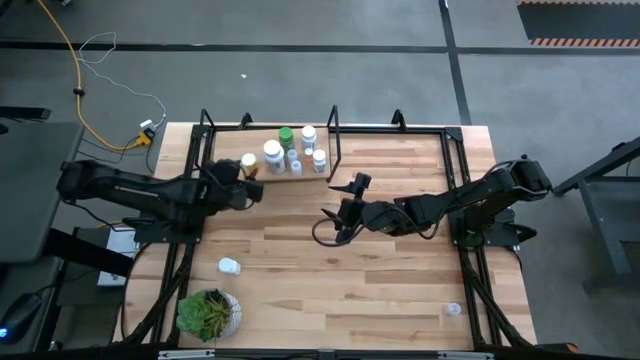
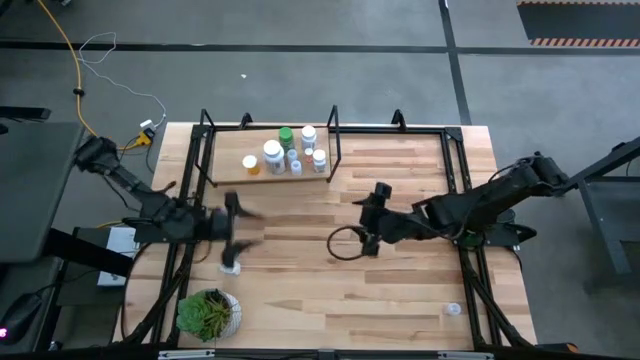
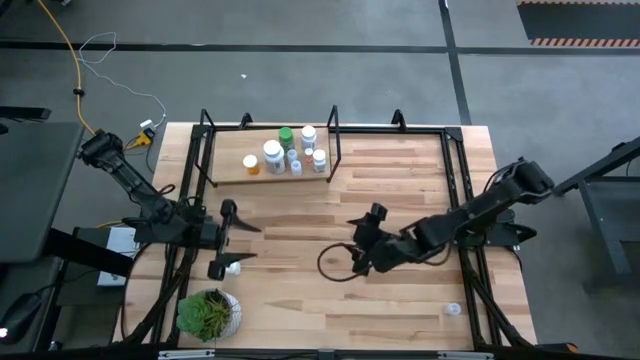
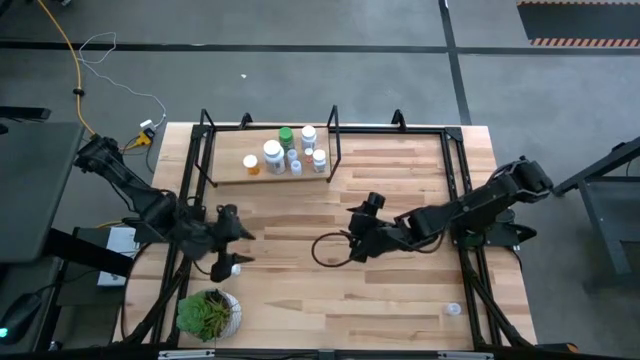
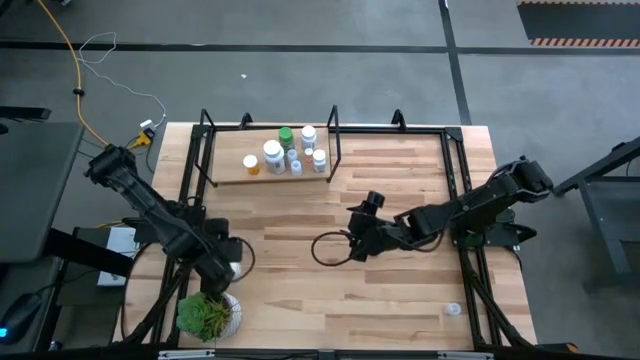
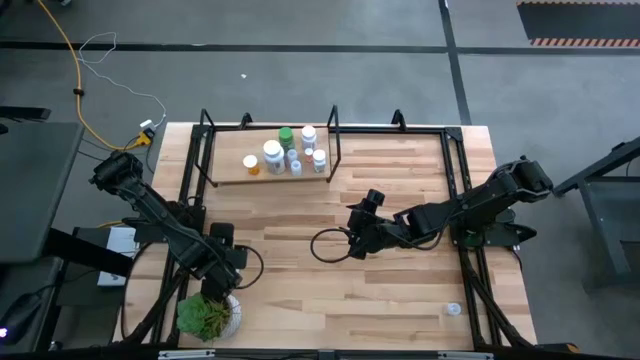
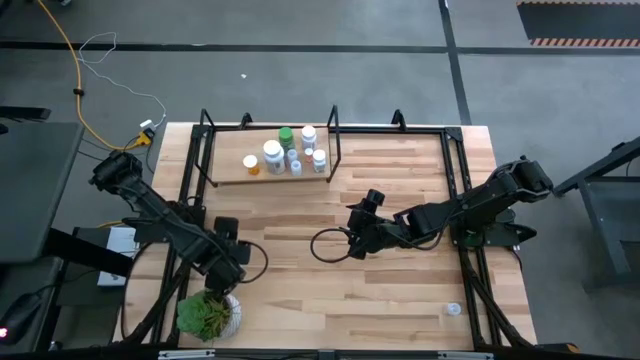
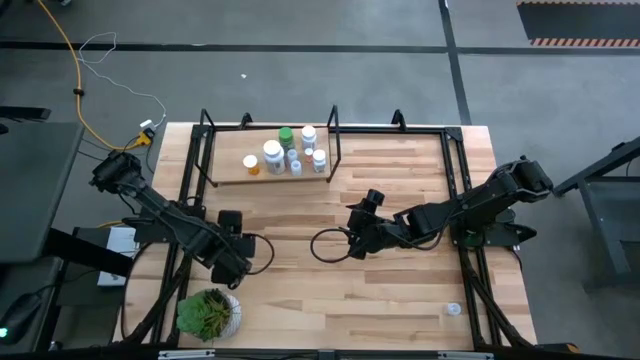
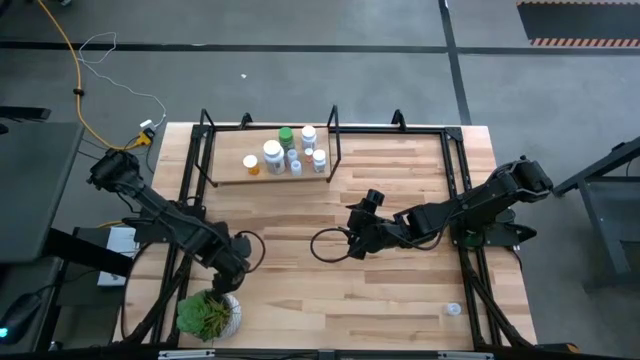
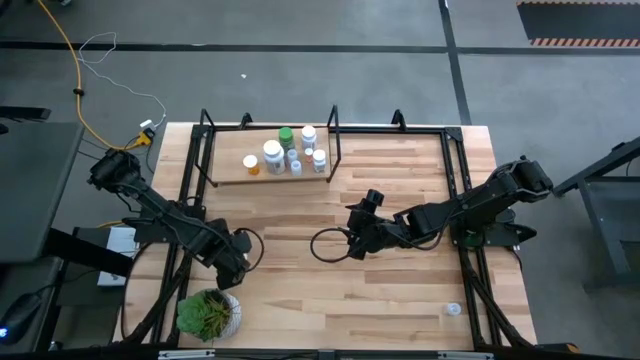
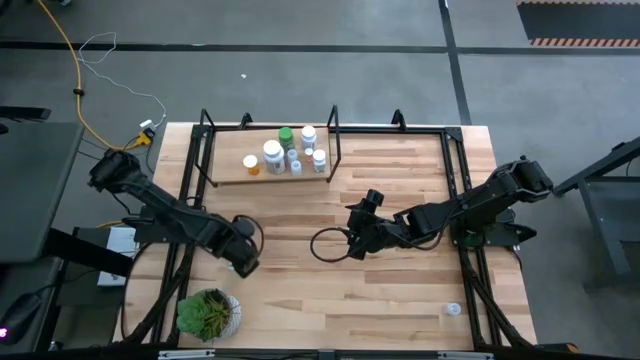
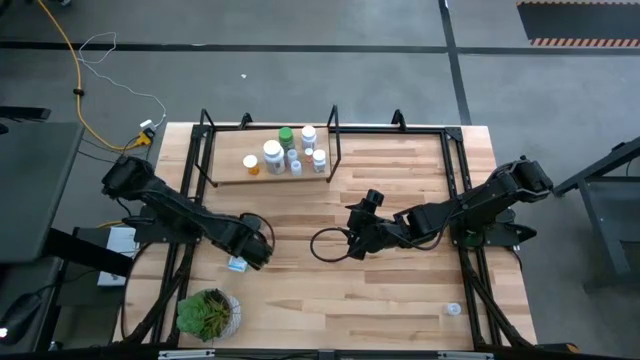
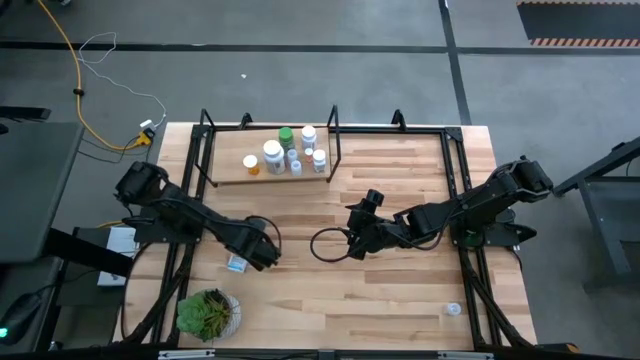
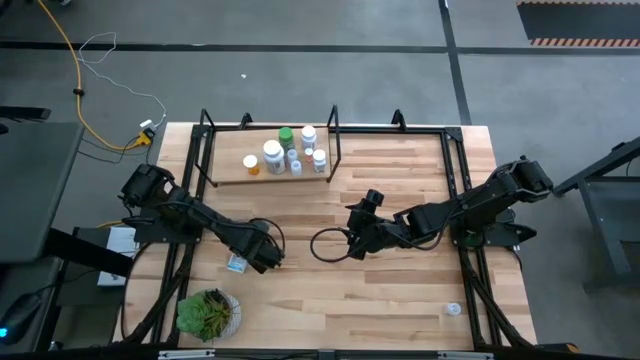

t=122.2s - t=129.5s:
Task: Pick and place medicine bottles onto shelf by color
Put the medium white pill bottle on the shelf

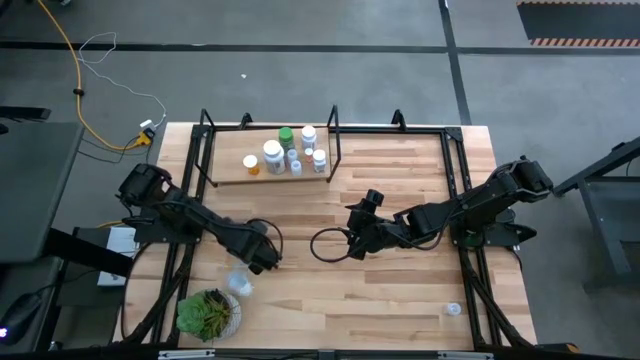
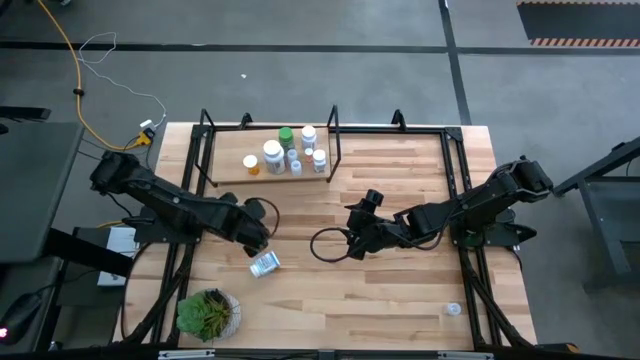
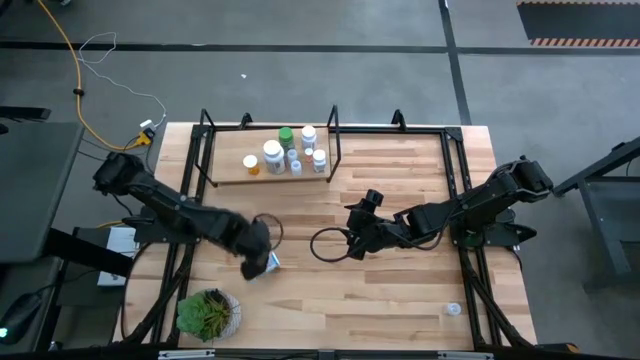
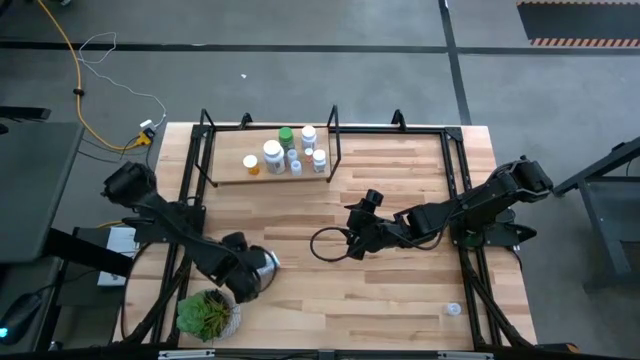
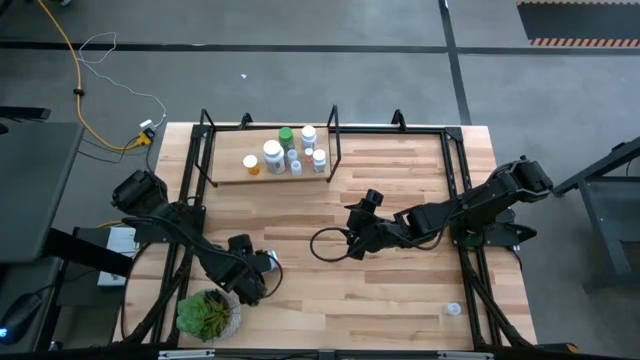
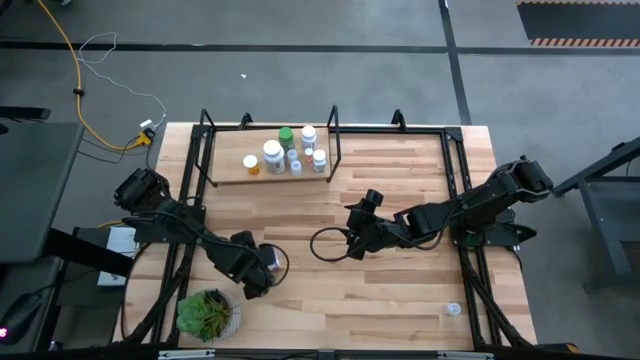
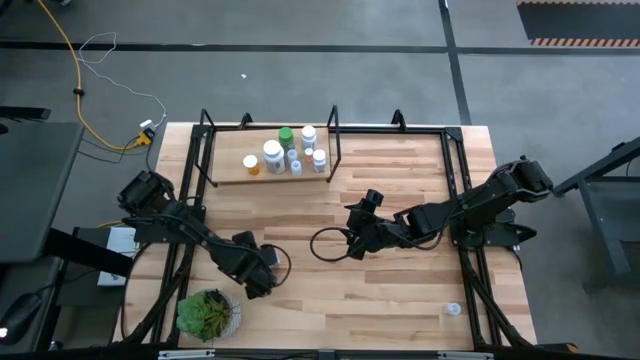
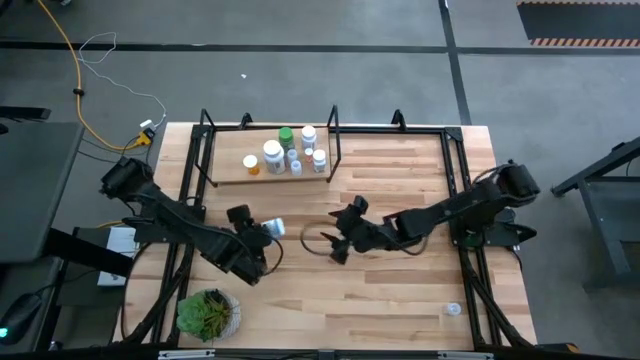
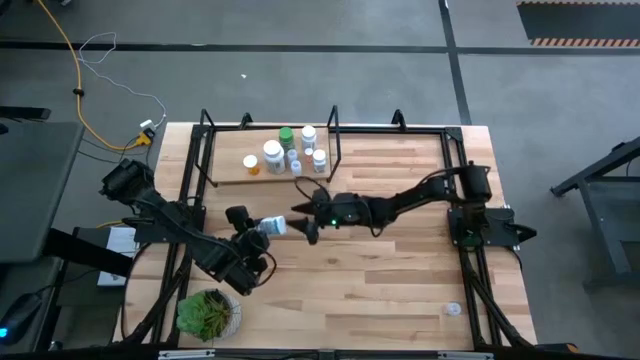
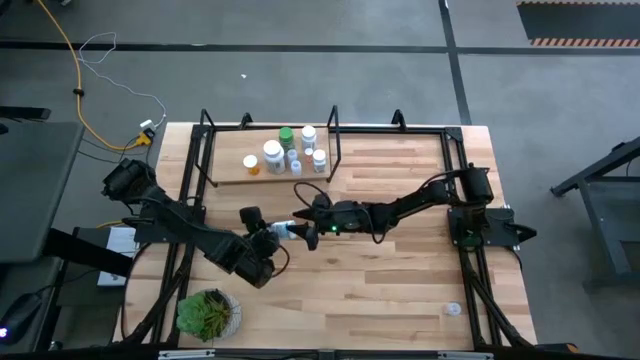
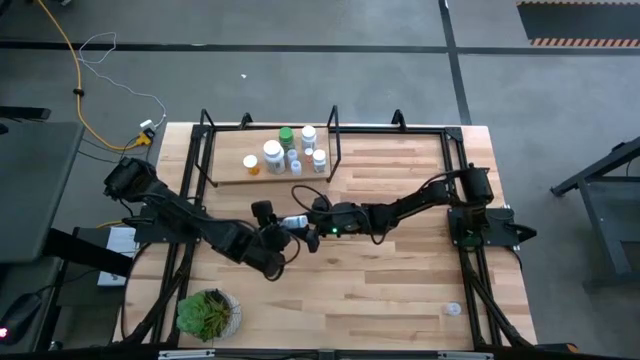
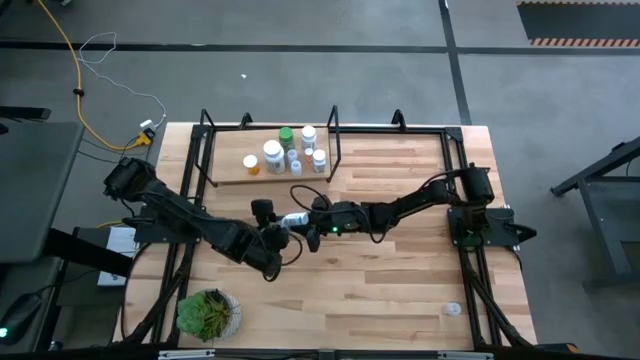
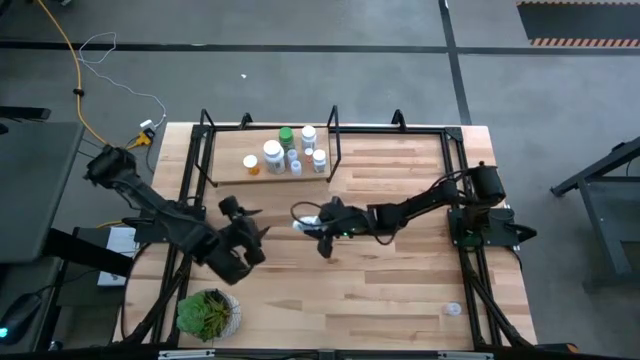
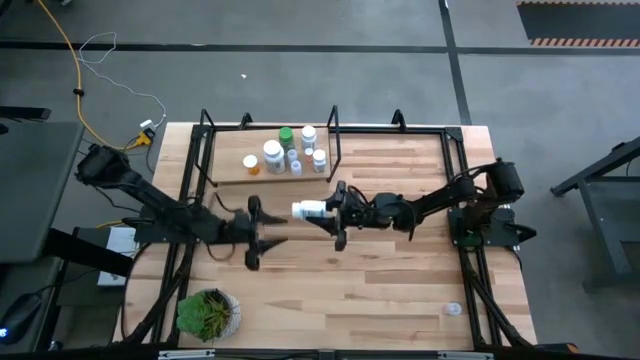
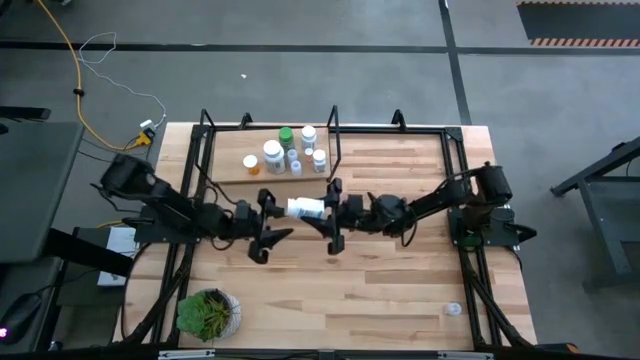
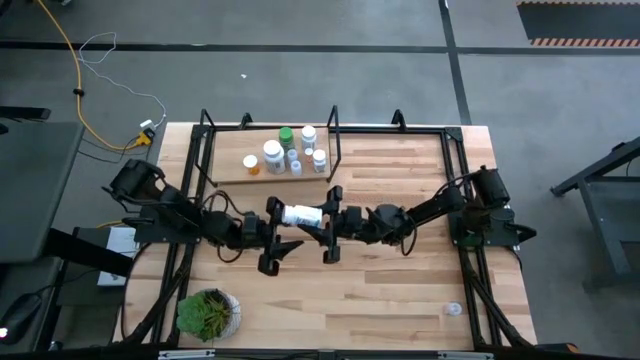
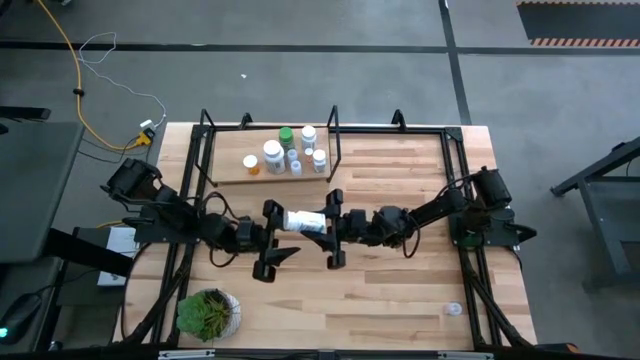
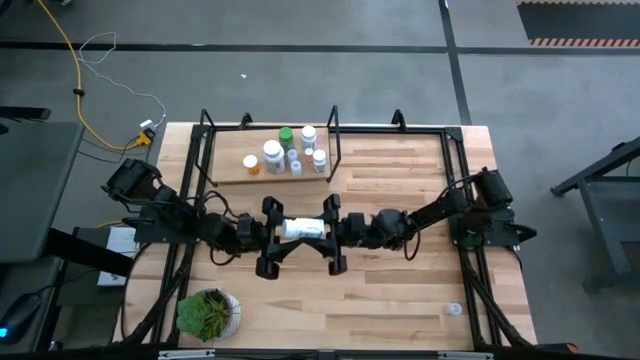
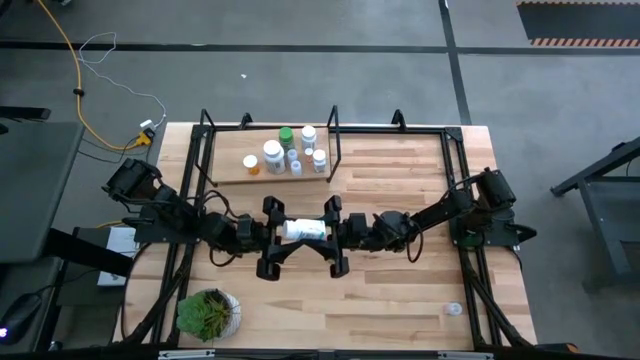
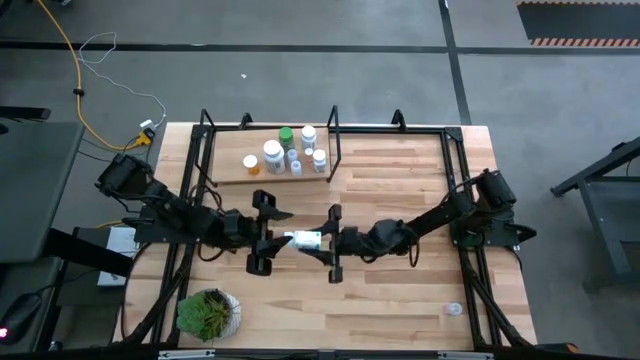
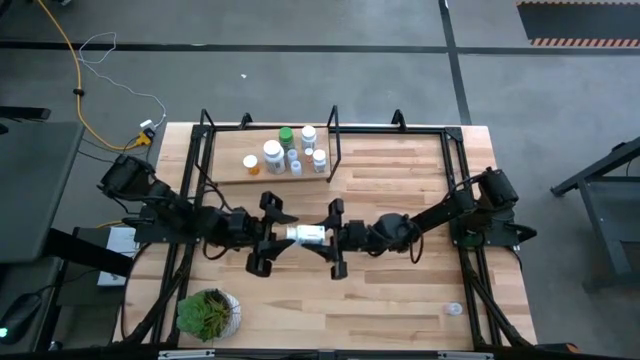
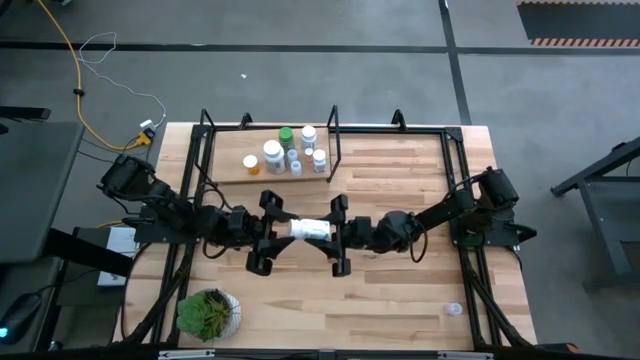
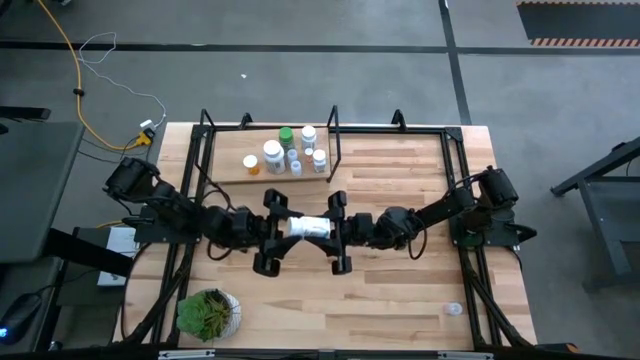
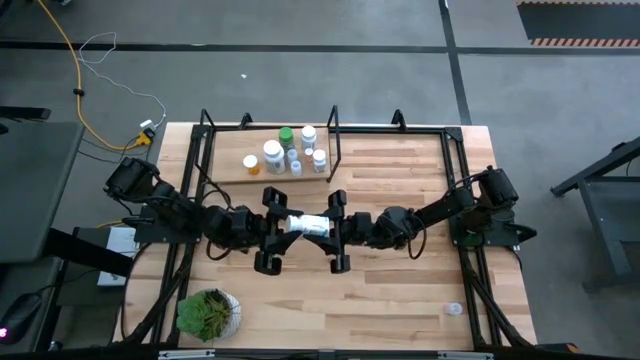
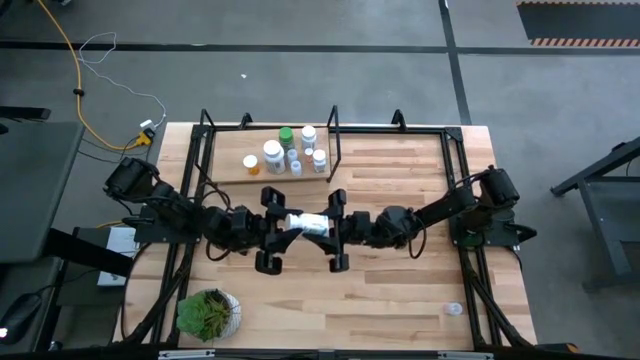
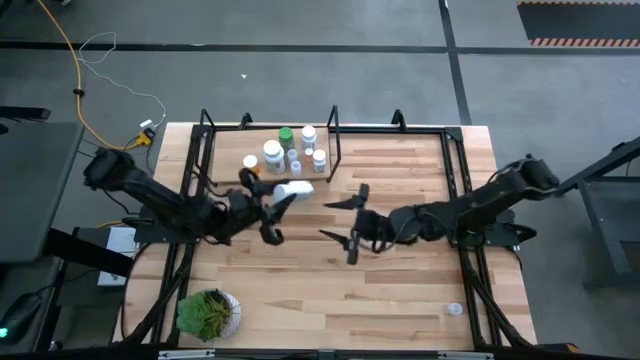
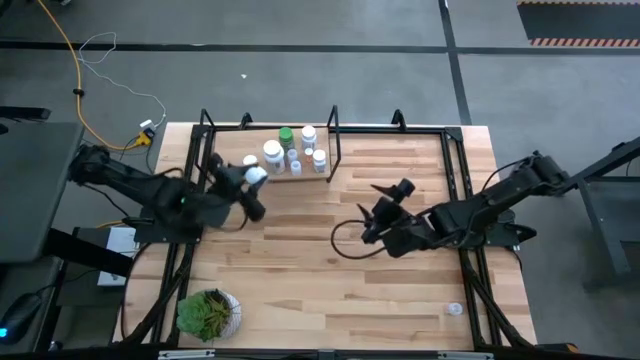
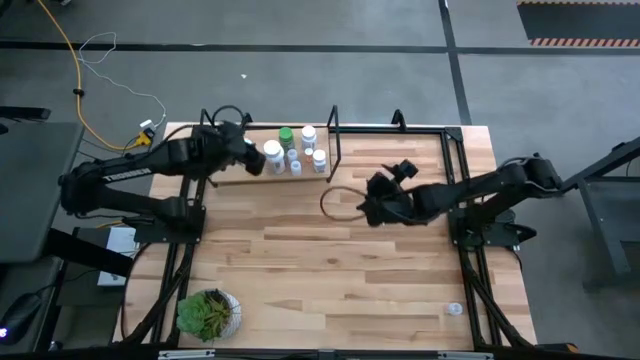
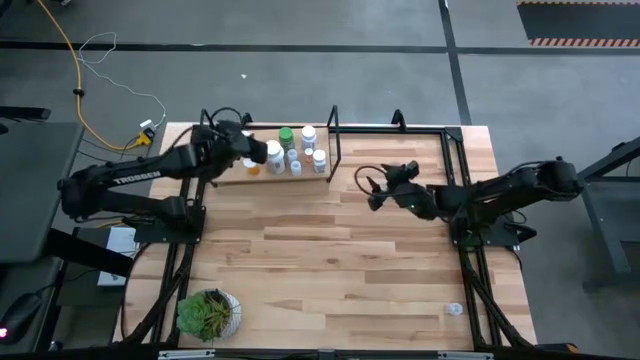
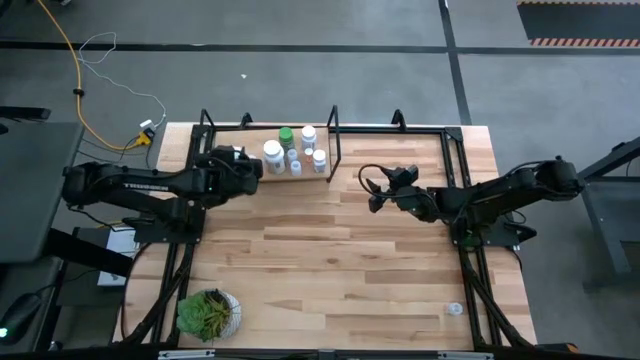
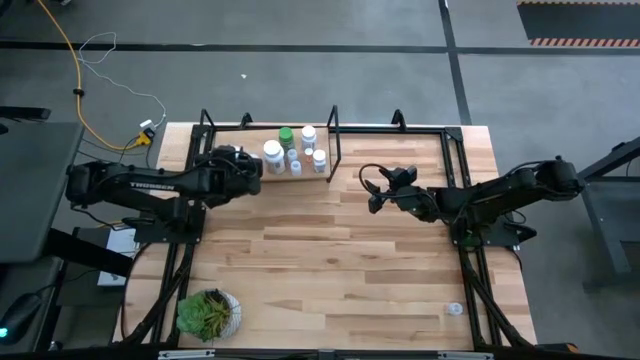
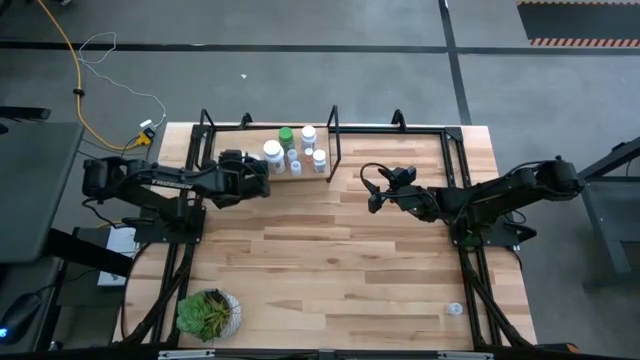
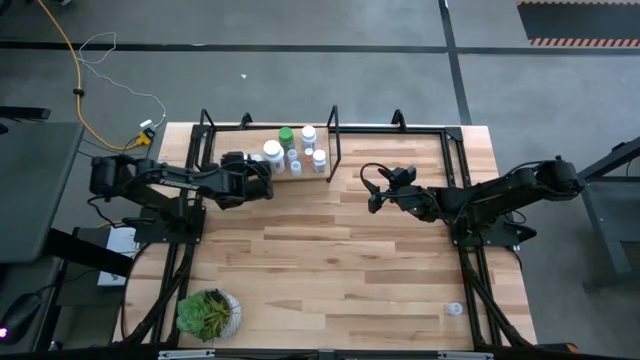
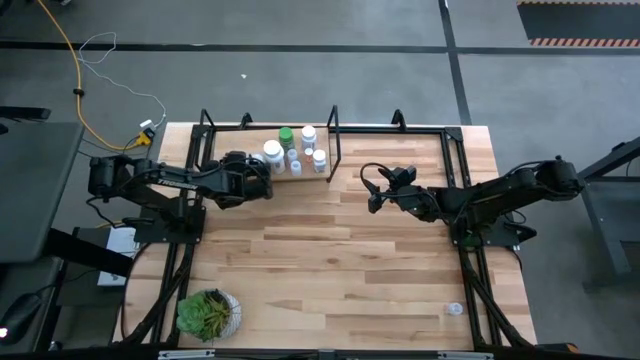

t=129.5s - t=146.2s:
Put the medium white pill bottle on the shelf
